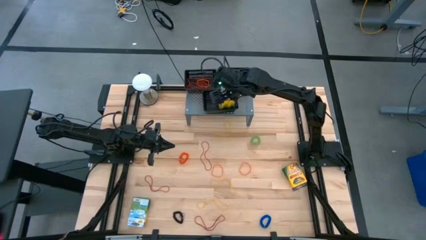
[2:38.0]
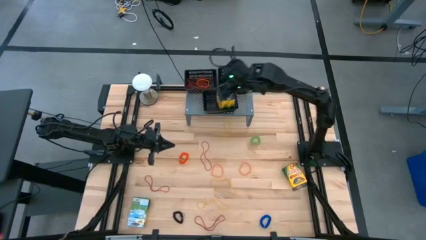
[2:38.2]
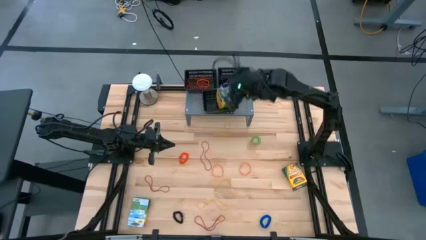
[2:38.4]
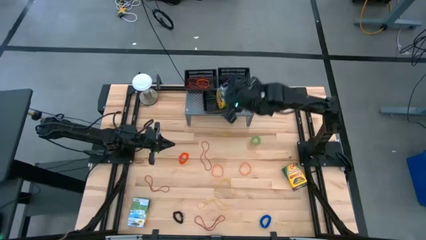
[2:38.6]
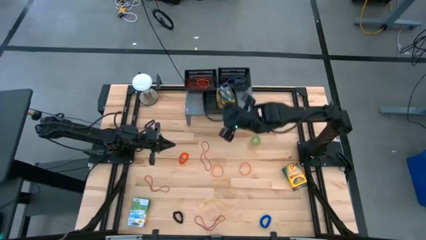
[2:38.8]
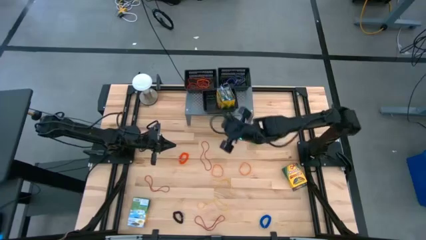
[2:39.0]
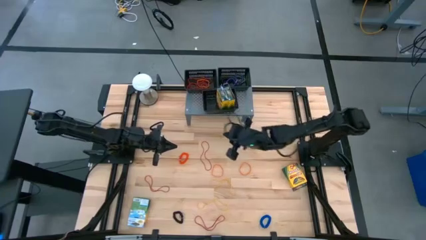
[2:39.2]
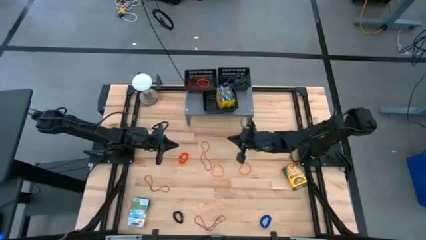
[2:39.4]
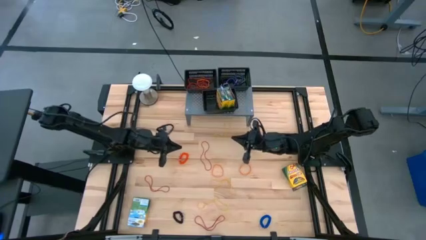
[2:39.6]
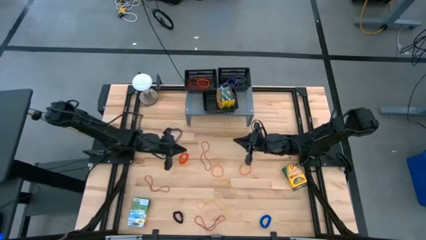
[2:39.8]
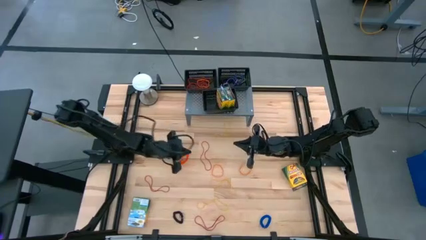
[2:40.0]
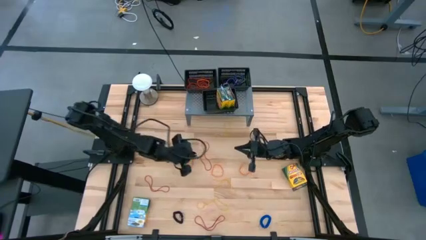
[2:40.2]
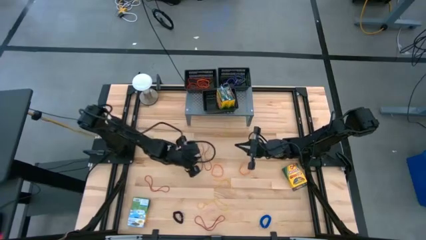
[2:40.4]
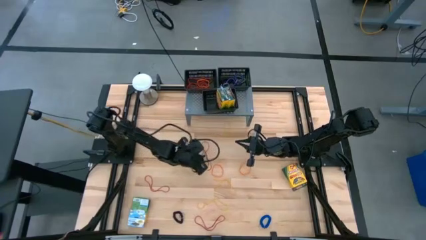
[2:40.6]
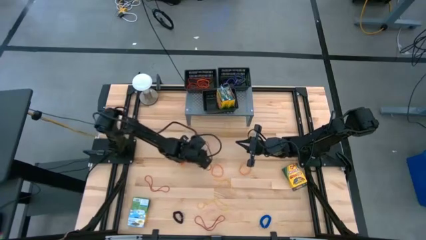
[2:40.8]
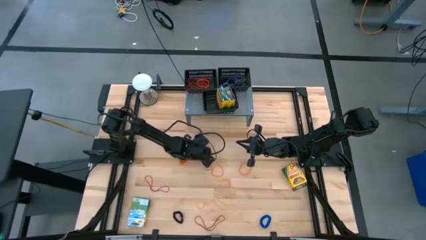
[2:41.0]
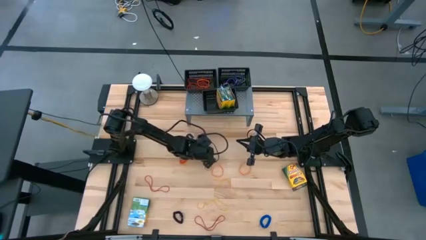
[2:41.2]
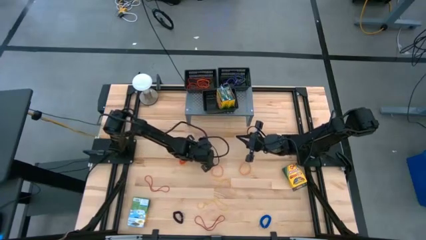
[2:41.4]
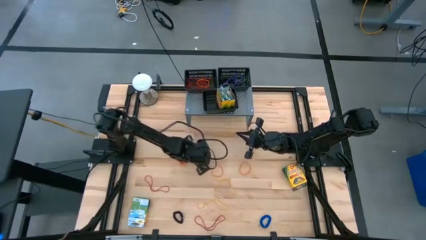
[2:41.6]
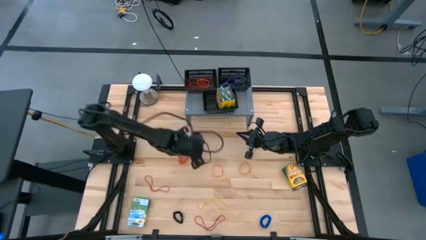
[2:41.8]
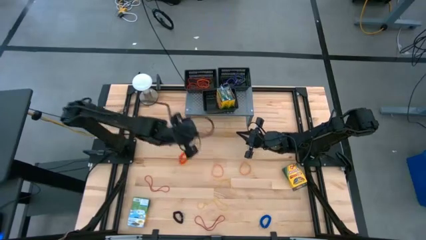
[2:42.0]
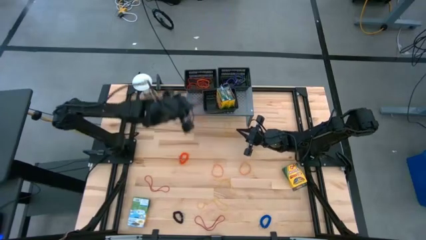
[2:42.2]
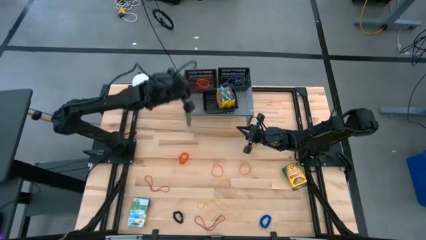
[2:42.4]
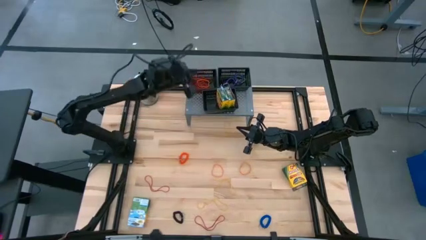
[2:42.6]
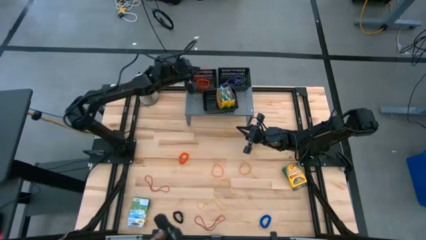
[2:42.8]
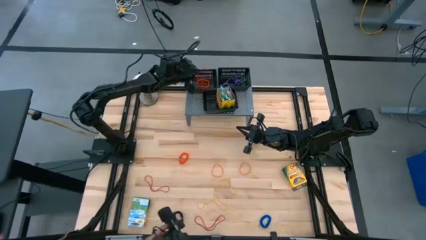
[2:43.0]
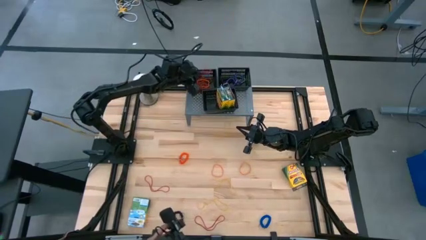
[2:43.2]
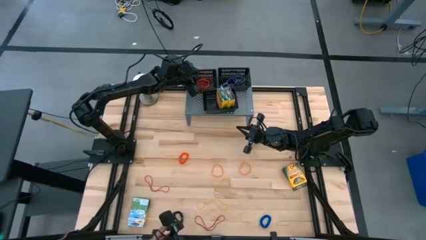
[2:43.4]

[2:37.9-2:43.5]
Task: Pick & Place Office Desk Supplies
Put the red rubber band into the top left black basket on the shelf

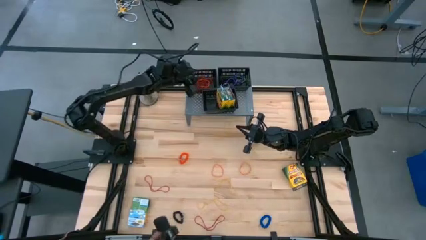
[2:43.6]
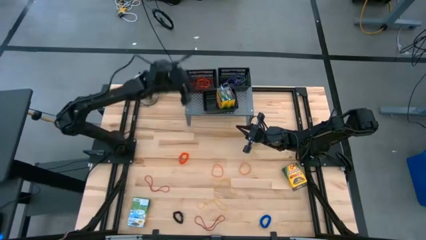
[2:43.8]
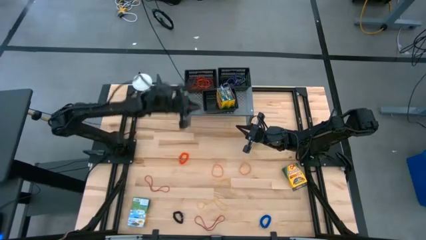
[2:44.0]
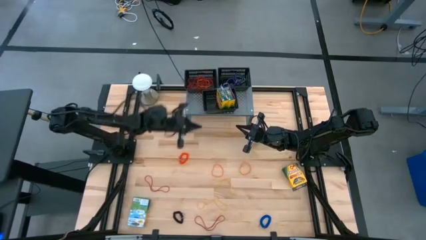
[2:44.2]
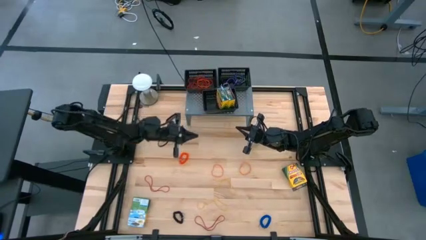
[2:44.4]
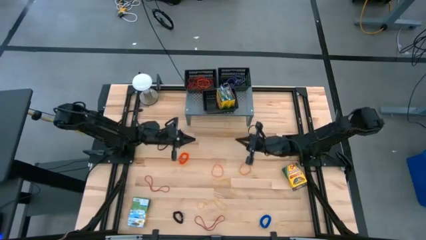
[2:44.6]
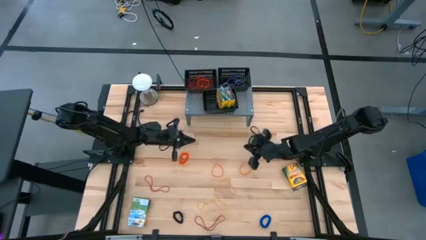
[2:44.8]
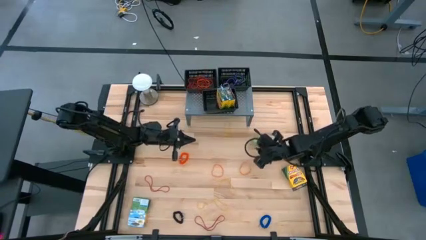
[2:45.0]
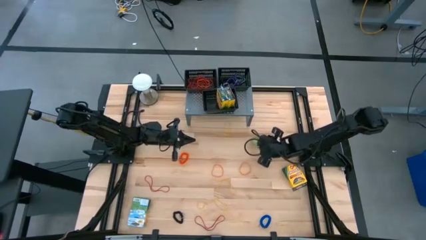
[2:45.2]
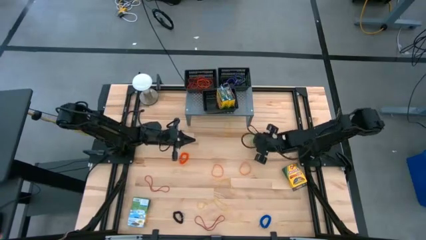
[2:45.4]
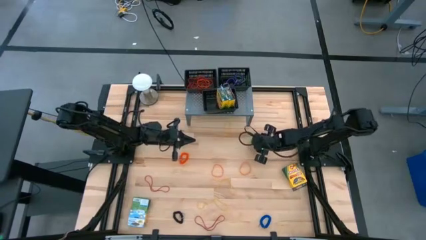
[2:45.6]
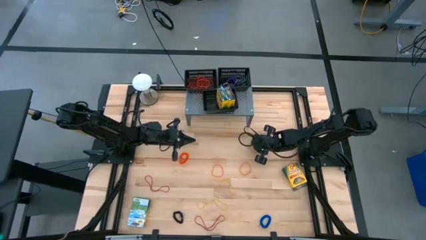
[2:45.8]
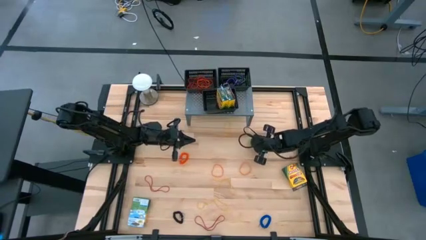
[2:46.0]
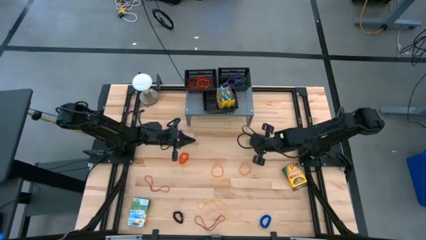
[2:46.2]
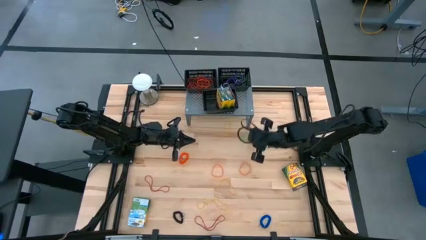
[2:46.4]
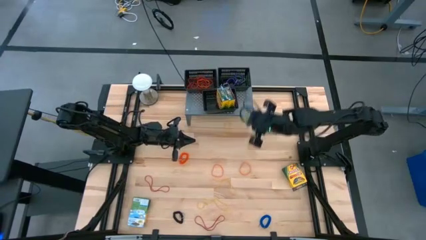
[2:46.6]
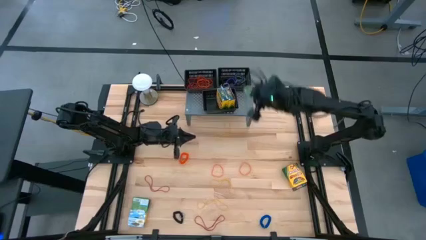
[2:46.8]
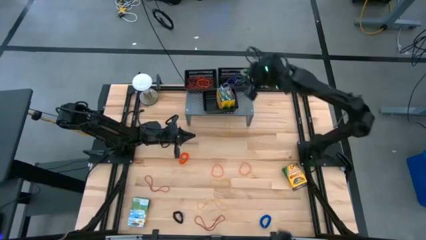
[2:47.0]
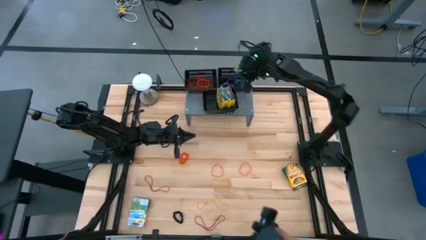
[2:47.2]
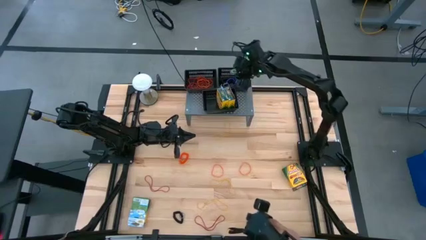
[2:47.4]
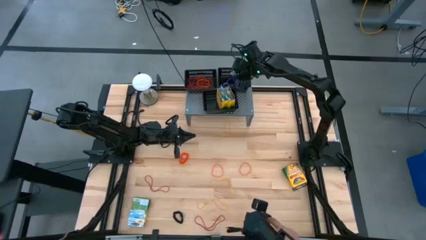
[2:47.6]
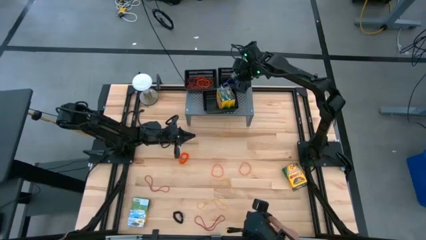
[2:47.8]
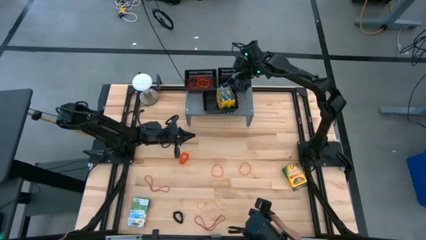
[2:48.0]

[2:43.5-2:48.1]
Put the green spring keychain into the top right black basket on the shelf

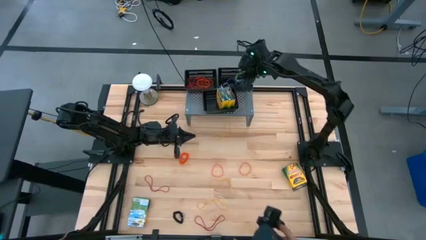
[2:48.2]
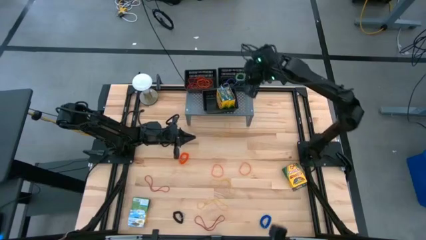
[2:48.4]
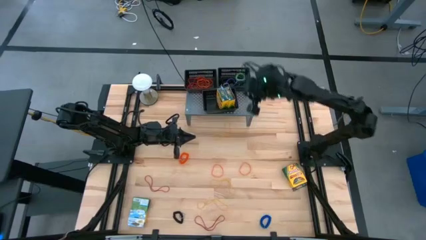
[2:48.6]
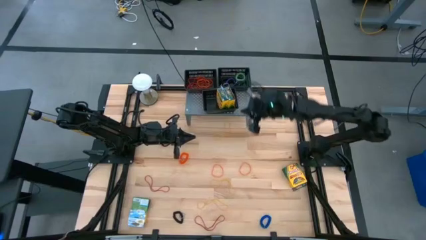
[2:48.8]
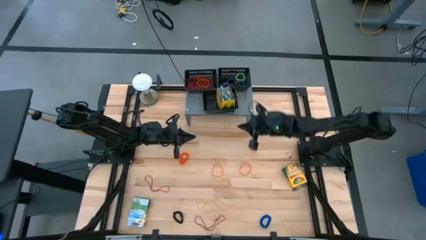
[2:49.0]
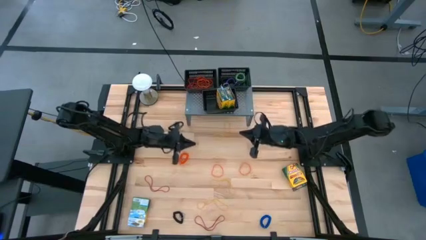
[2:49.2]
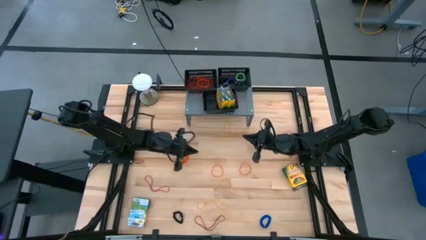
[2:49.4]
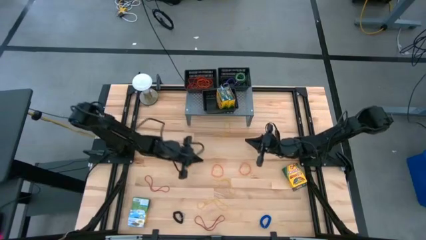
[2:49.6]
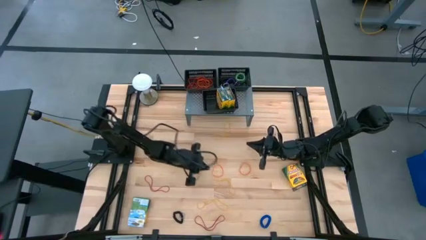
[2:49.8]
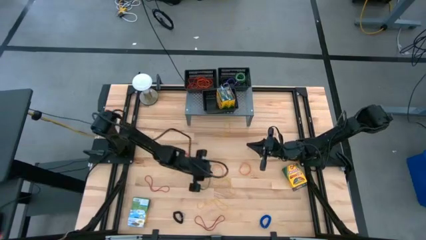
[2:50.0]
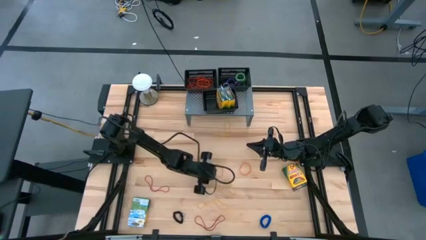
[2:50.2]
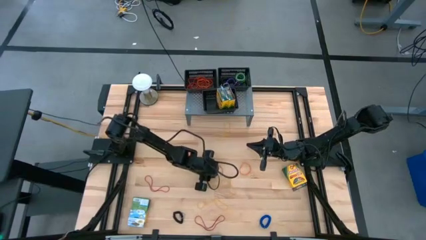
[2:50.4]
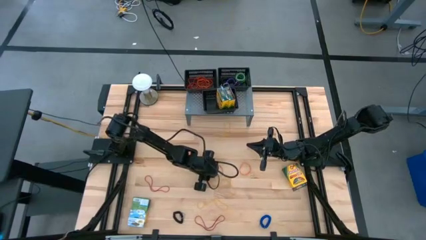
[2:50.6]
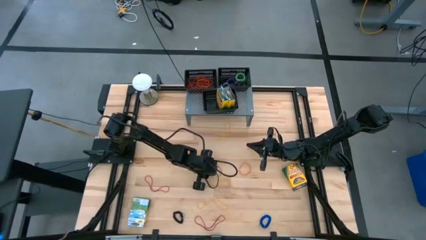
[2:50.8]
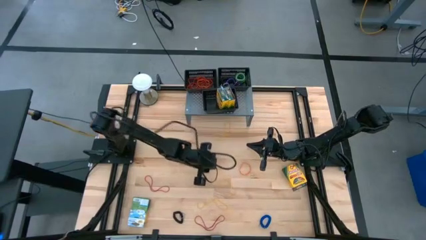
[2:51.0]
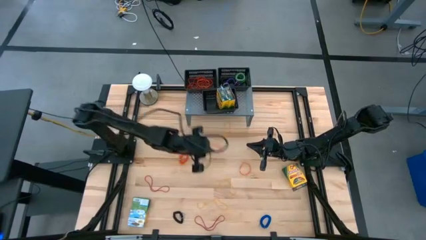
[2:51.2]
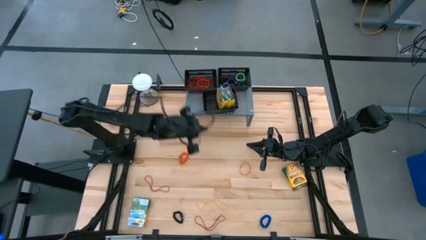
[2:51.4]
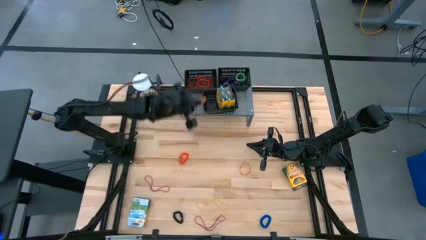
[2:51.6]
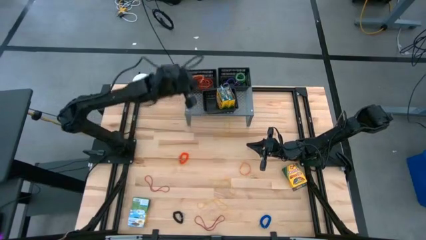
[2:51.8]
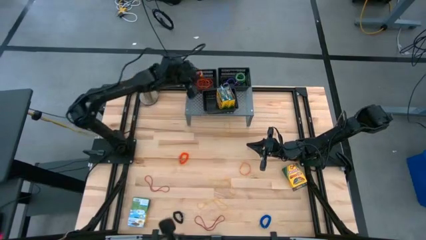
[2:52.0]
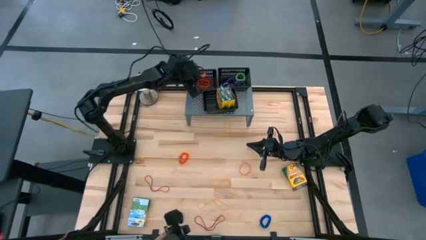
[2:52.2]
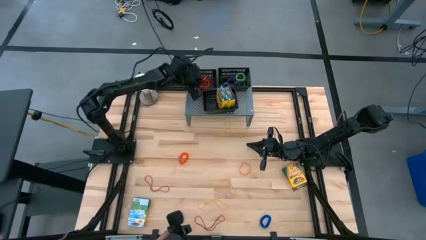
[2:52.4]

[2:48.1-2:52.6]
Put the orange rubber band into the top left black basket on the shelf
